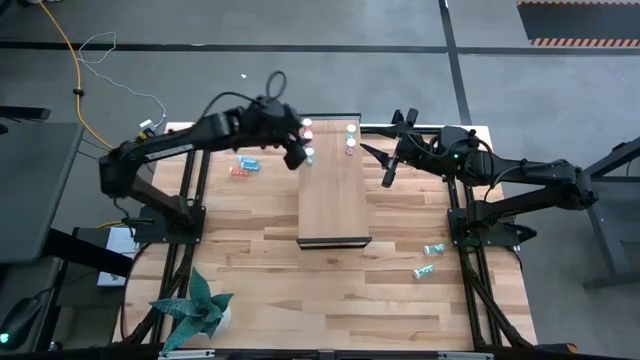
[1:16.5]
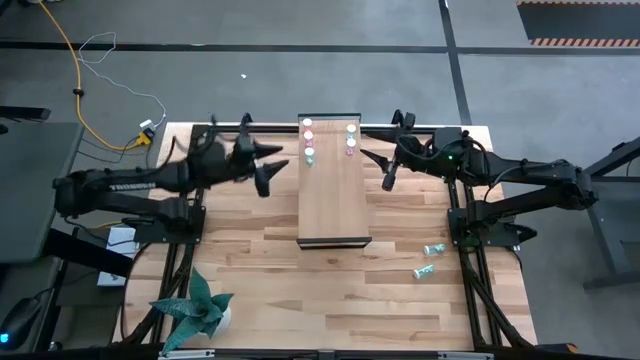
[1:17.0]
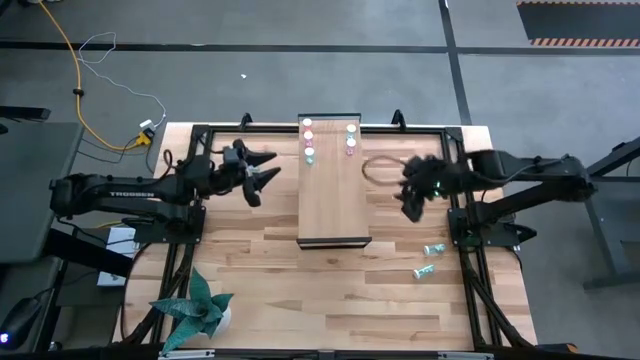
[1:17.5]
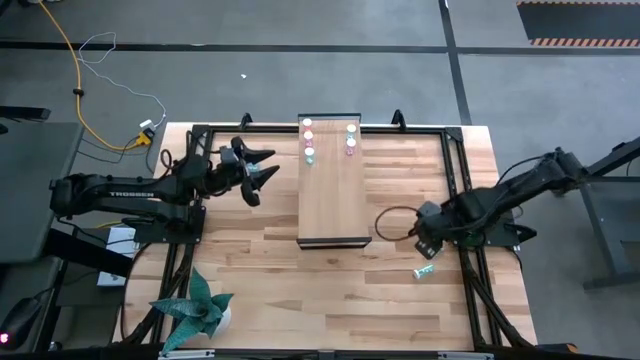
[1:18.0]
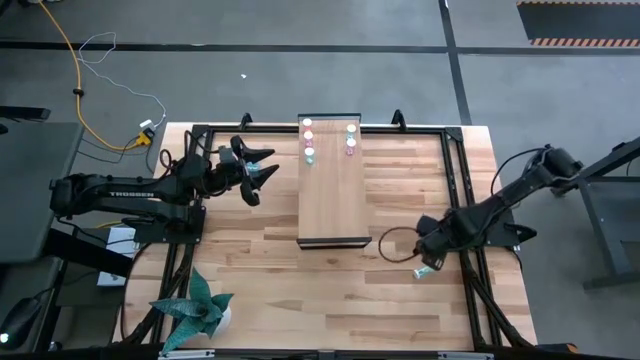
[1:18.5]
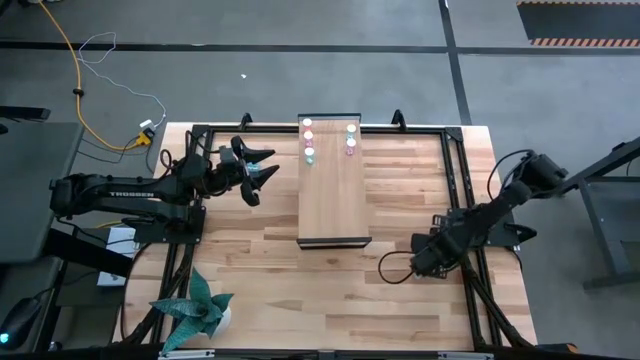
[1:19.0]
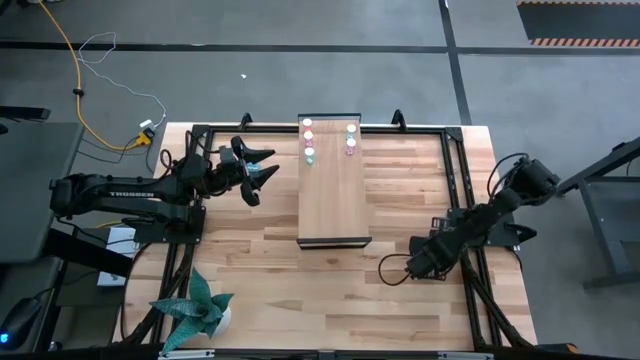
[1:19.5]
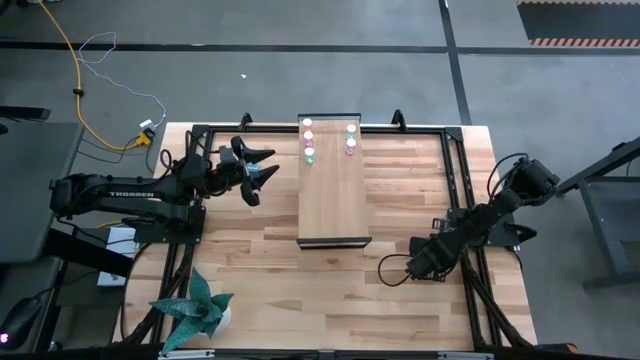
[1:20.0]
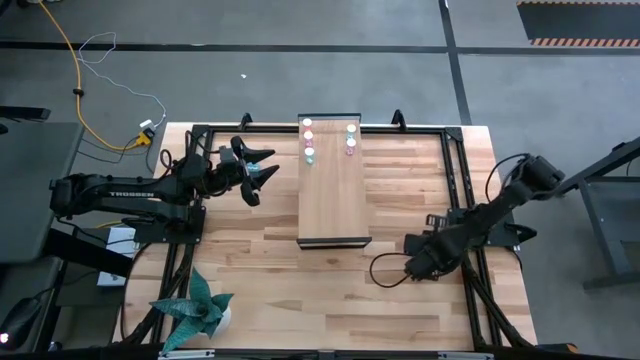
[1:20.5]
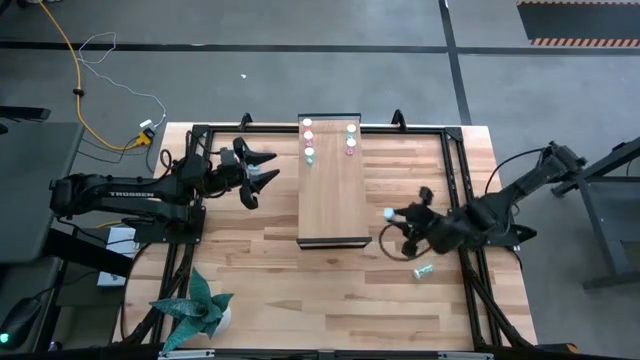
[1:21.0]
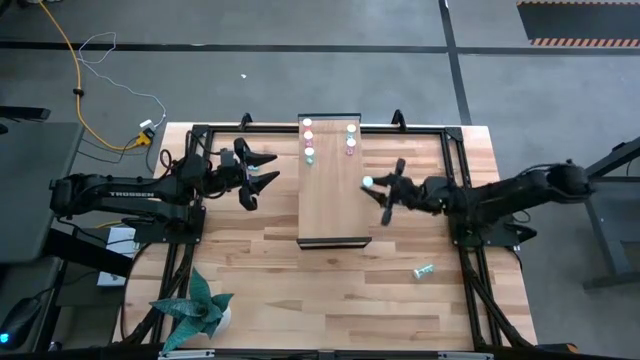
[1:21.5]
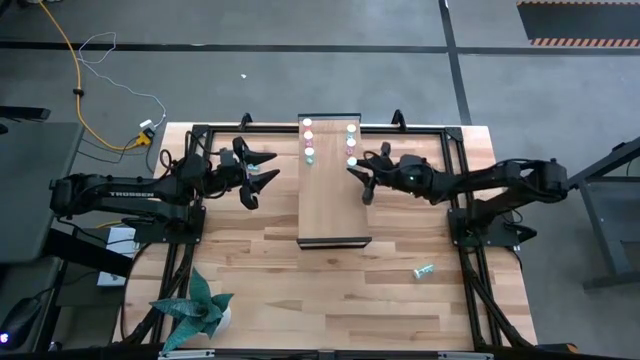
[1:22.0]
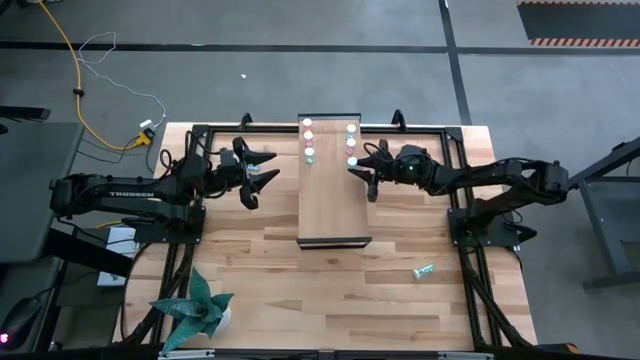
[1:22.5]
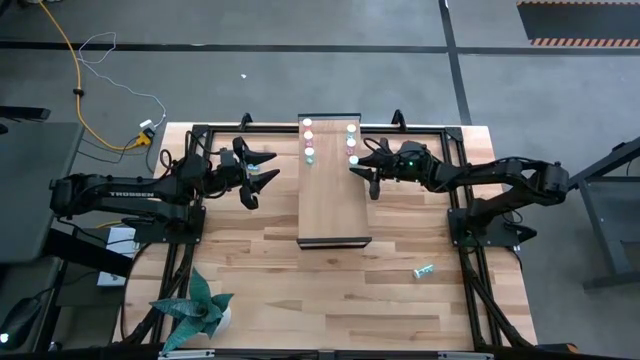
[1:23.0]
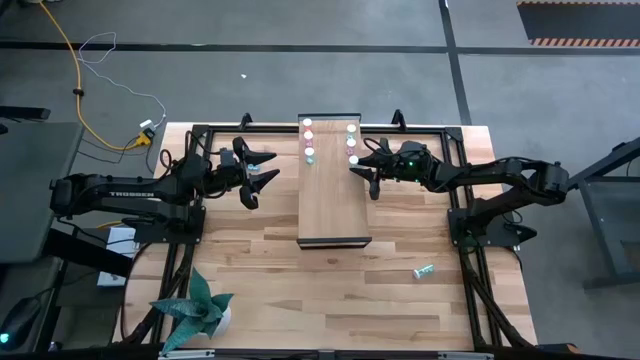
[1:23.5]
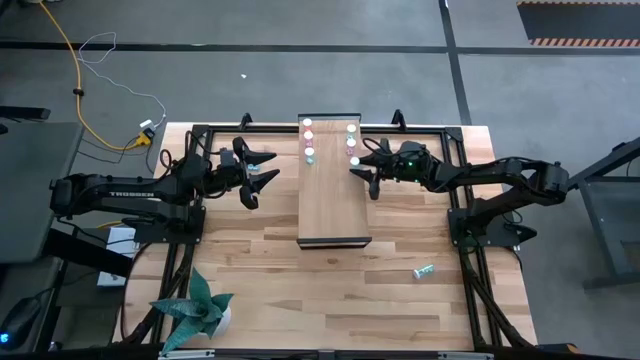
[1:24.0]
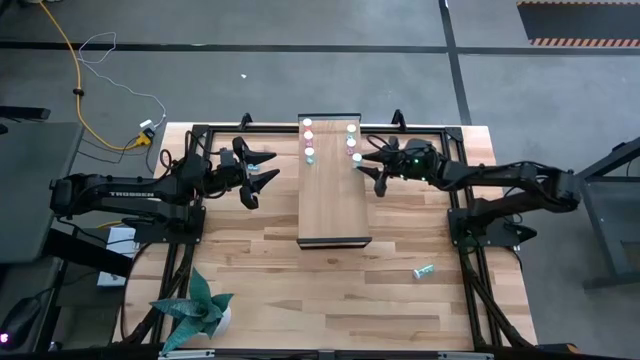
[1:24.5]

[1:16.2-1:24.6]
Task: Pick and place medicine bottles onto shelf by color
Put the transparent green pill bottle on the shelf

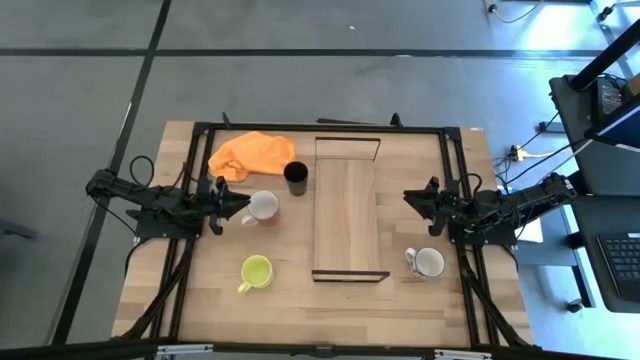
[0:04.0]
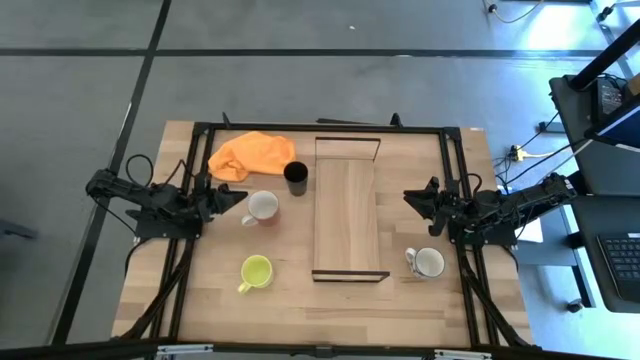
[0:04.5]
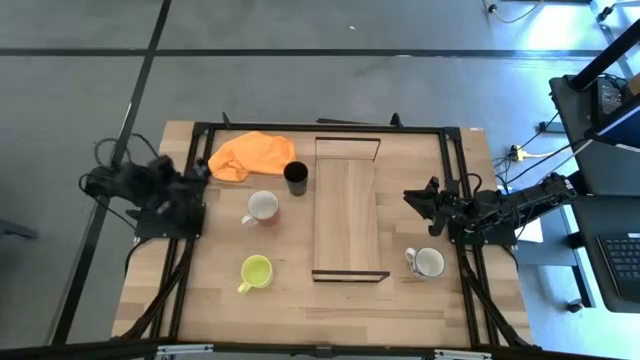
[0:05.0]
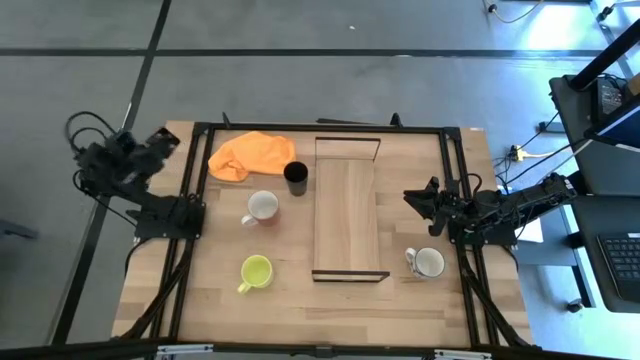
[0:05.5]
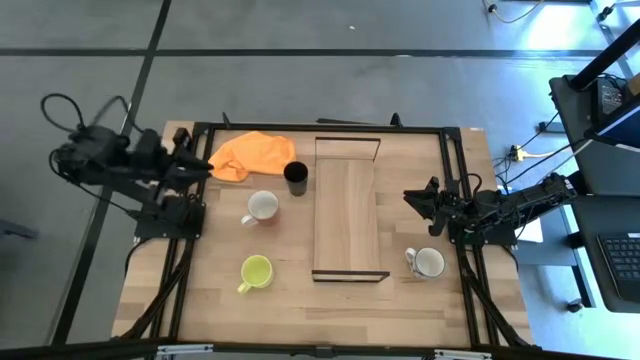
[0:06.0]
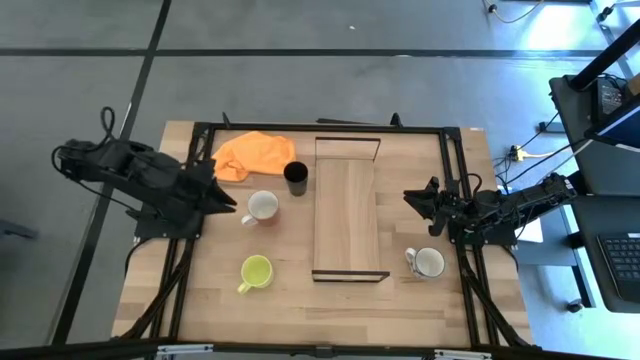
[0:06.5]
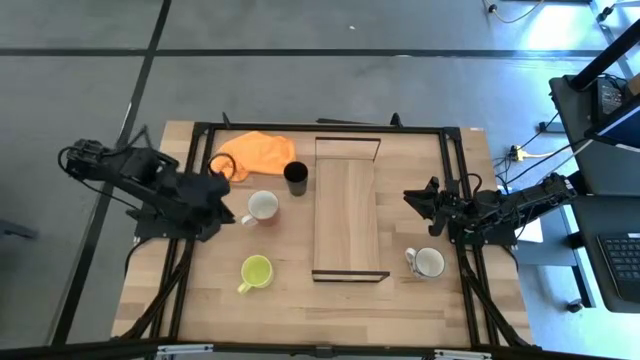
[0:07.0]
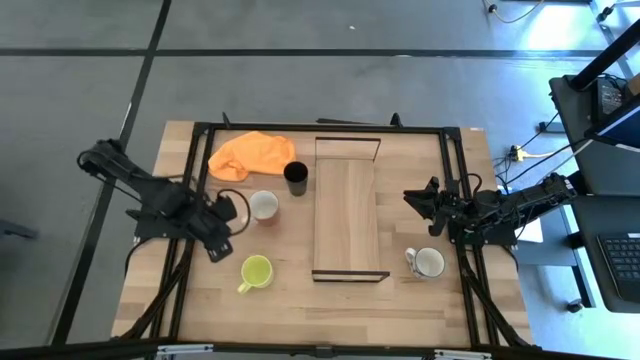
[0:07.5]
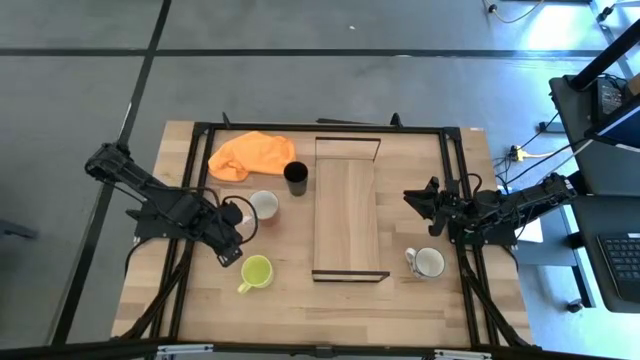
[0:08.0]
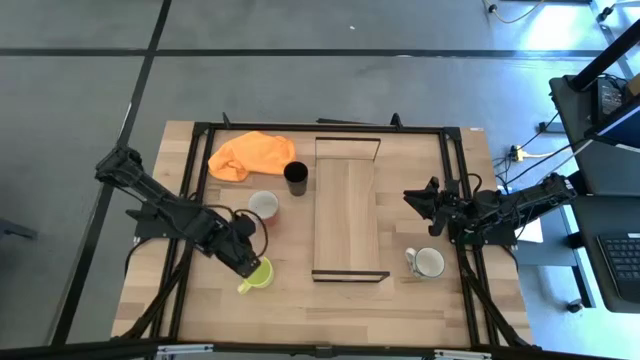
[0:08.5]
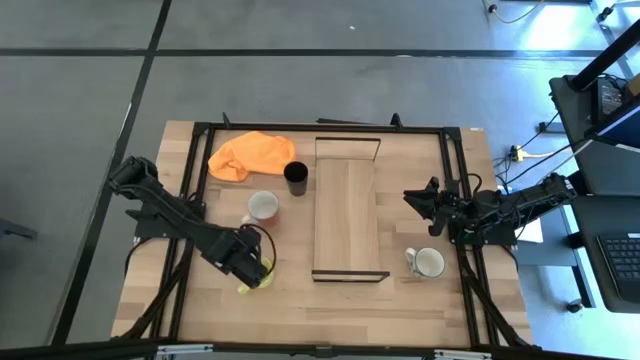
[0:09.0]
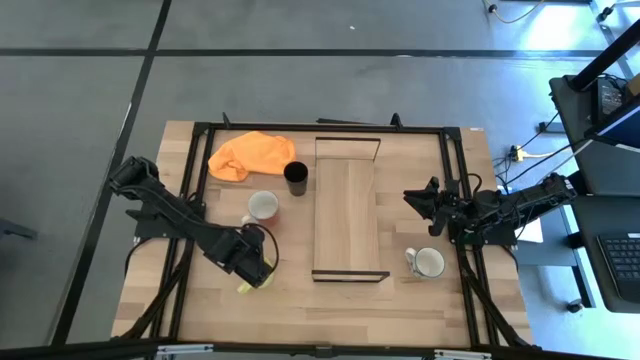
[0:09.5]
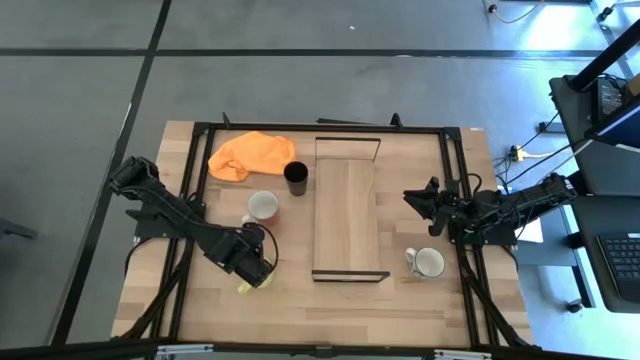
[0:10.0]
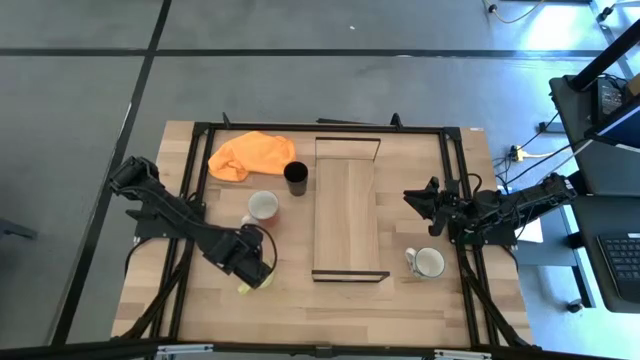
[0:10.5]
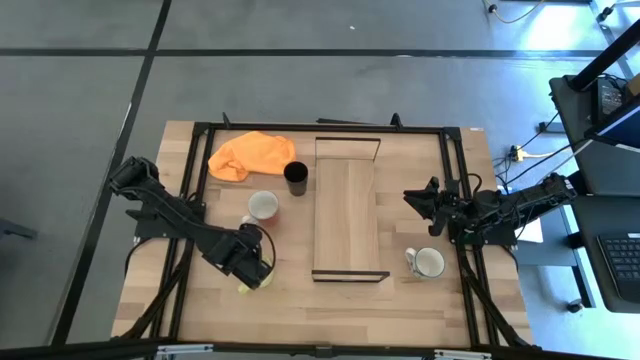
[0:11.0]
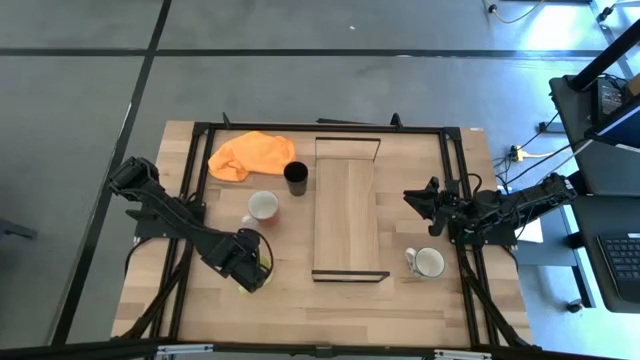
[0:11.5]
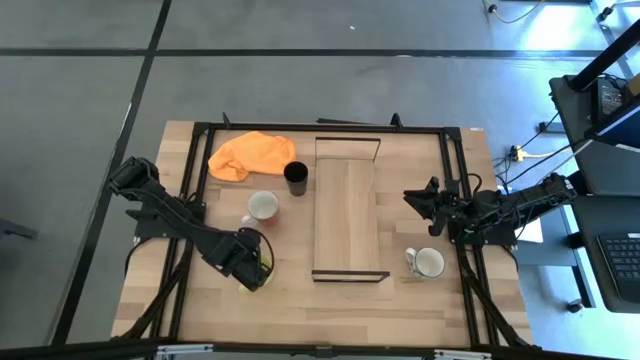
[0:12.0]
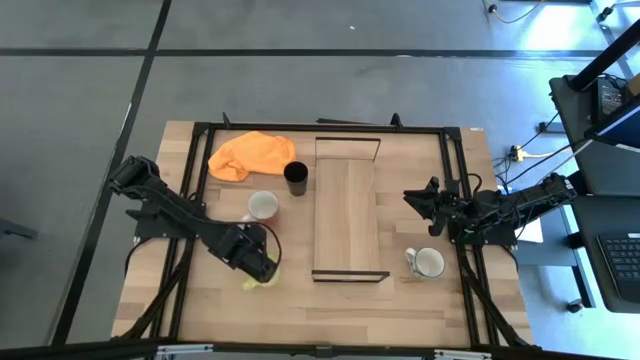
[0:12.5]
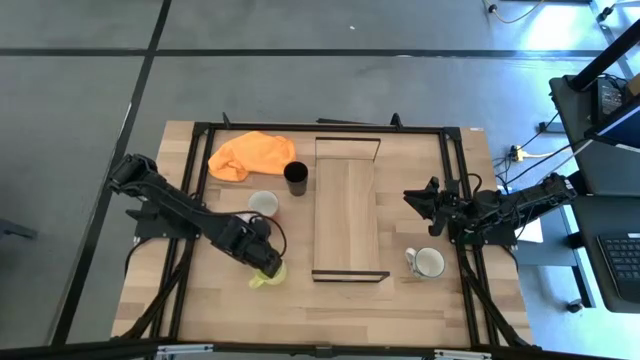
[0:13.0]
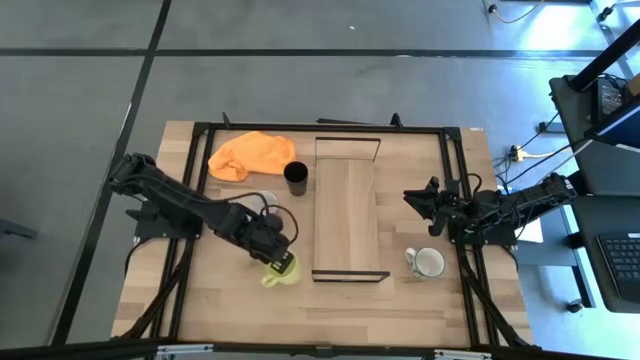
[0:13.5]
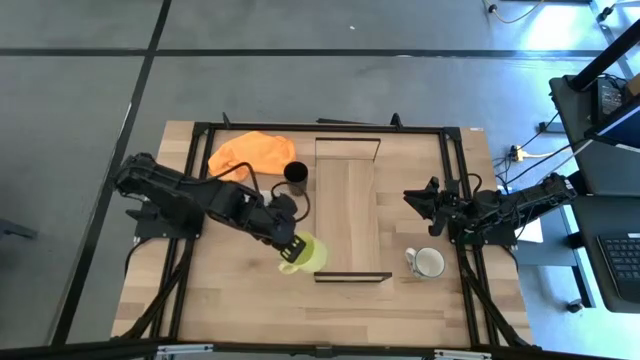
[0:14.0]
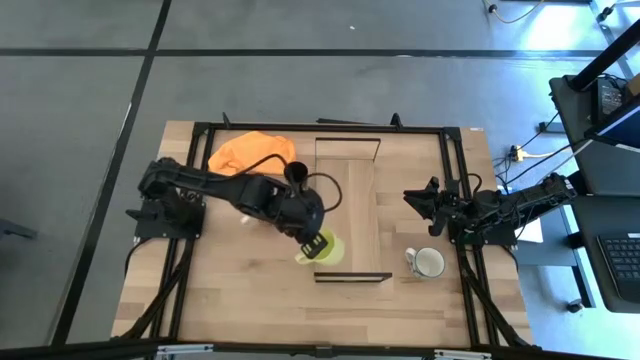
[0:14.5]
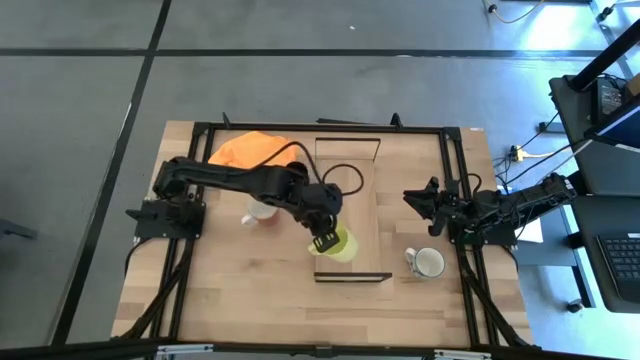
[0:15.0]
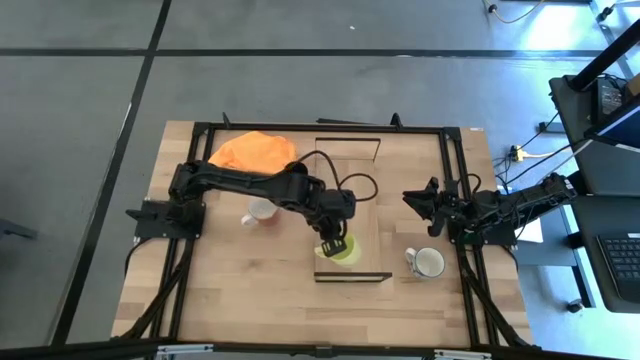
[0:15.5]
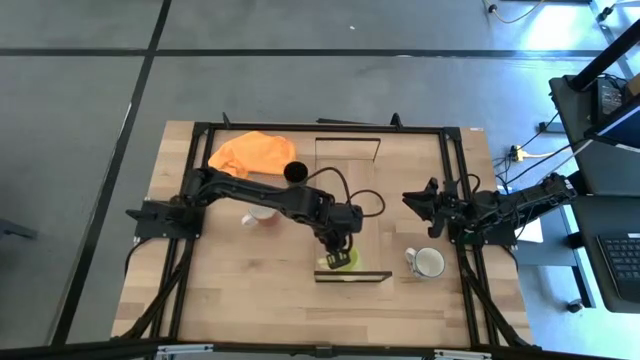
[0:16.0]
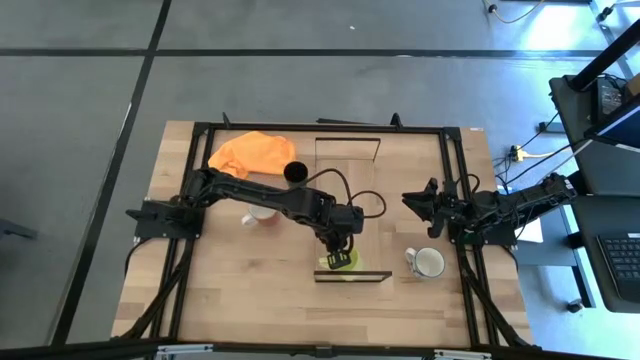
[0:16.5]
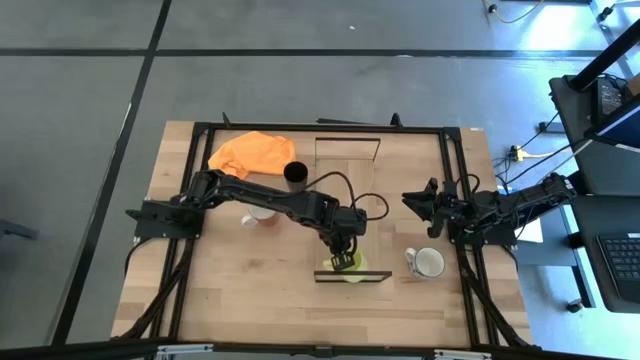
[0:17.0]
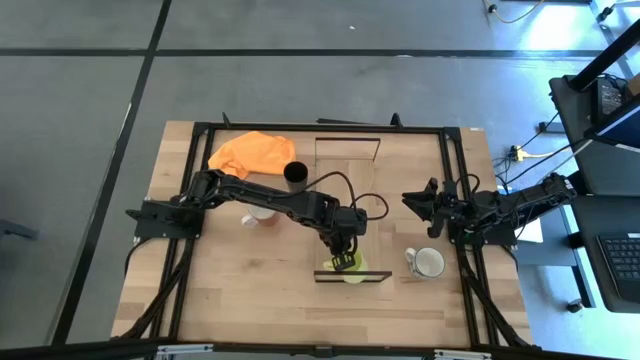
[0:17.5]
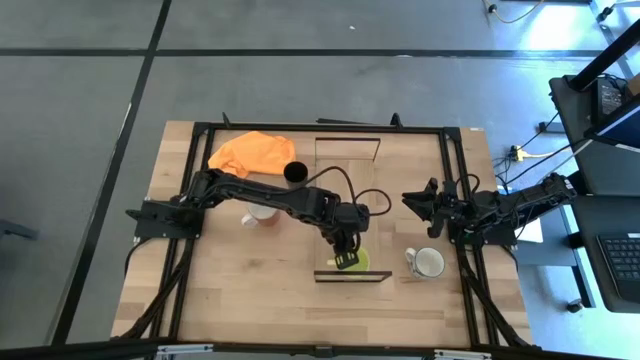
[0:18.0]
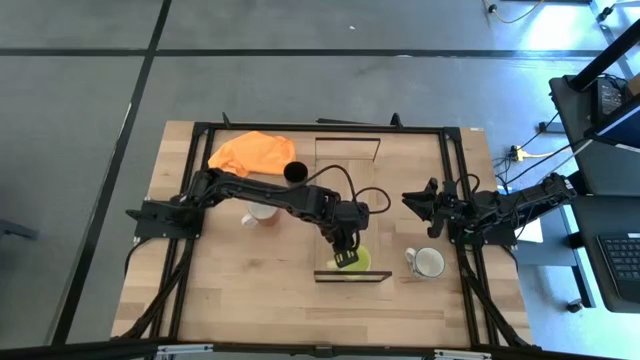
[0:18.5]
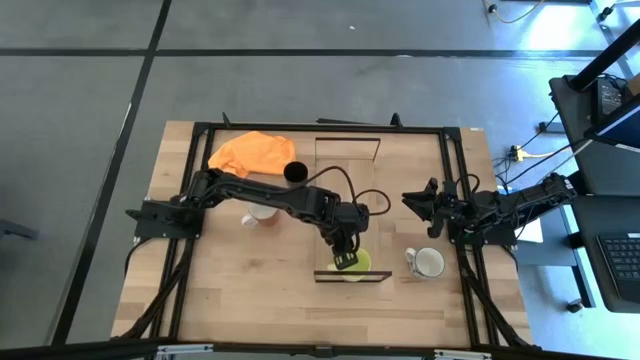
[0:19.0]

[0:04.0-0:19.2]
Task: Stack small to large cups/mugs on shelf
Put the yellow mug on the shelf
